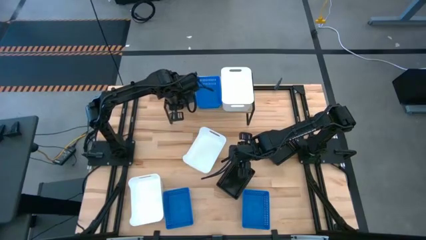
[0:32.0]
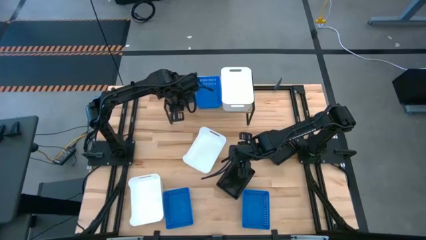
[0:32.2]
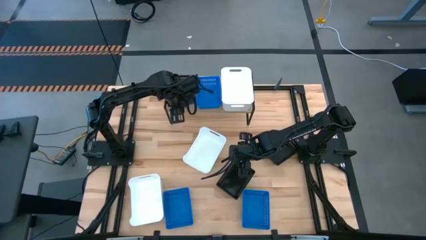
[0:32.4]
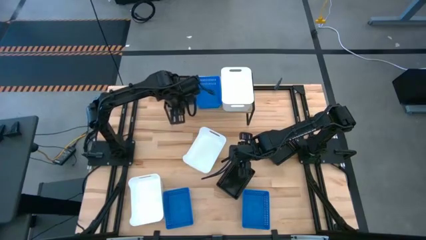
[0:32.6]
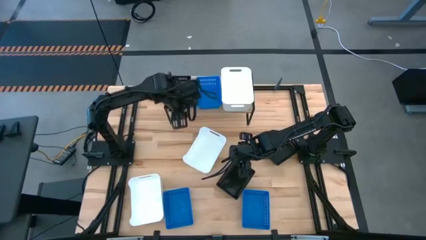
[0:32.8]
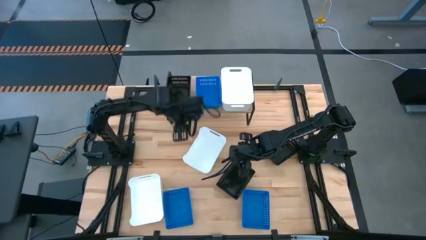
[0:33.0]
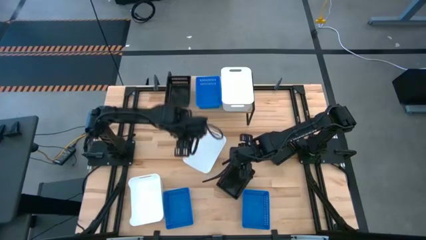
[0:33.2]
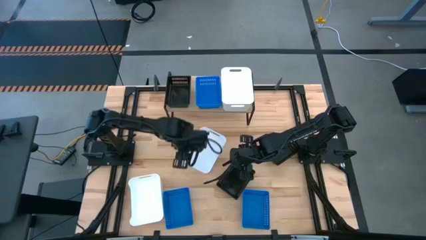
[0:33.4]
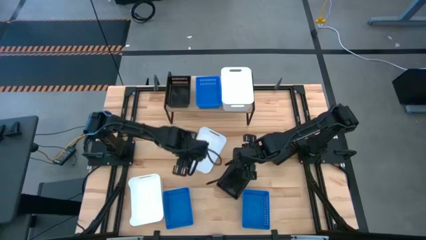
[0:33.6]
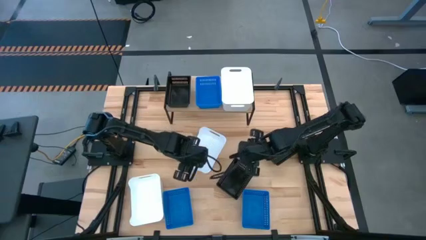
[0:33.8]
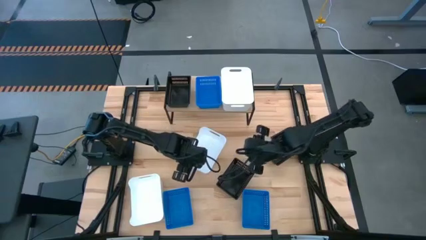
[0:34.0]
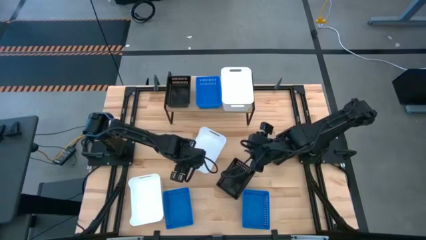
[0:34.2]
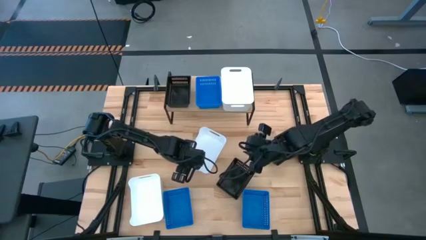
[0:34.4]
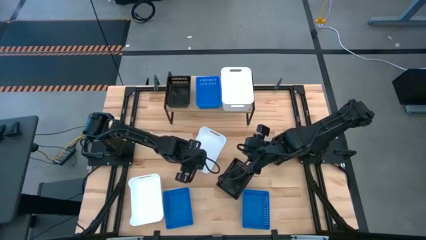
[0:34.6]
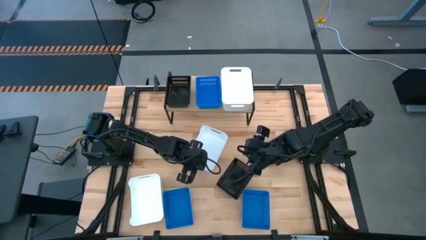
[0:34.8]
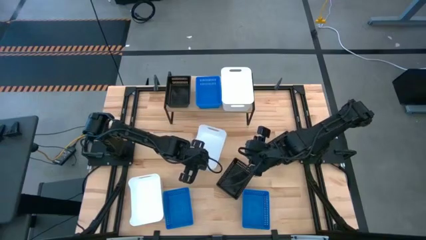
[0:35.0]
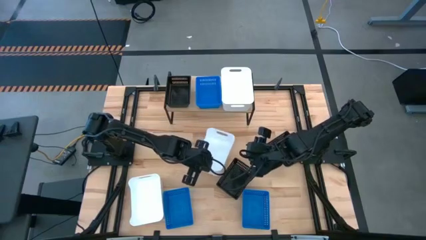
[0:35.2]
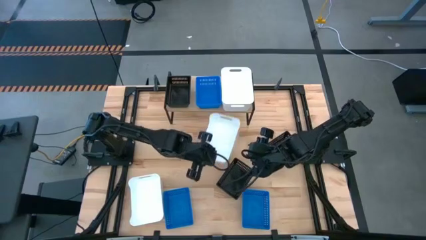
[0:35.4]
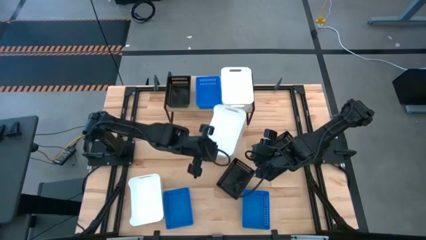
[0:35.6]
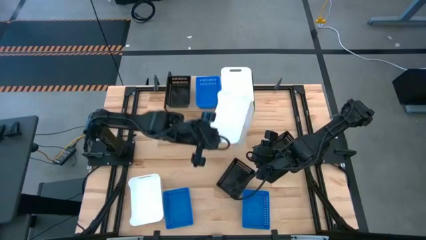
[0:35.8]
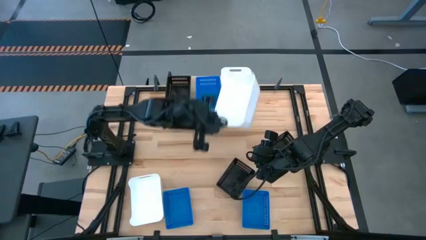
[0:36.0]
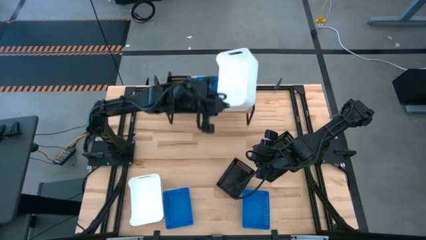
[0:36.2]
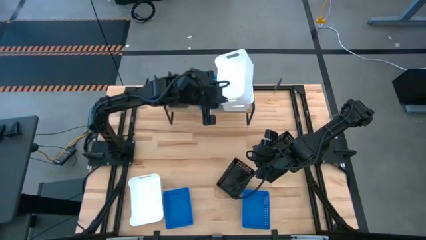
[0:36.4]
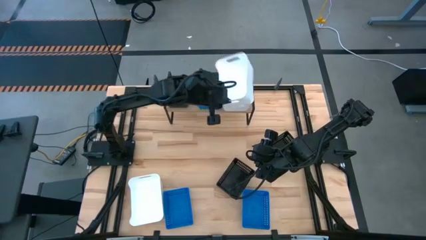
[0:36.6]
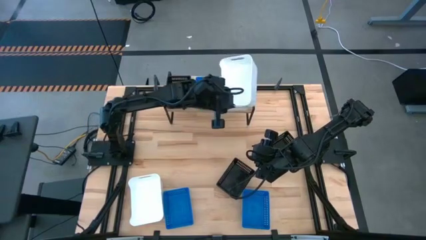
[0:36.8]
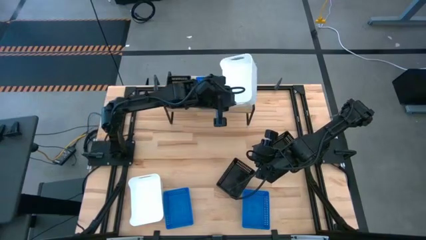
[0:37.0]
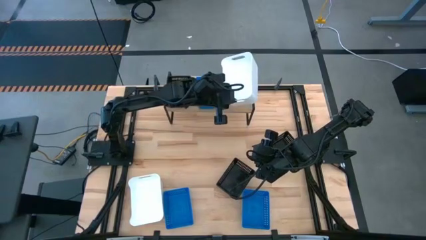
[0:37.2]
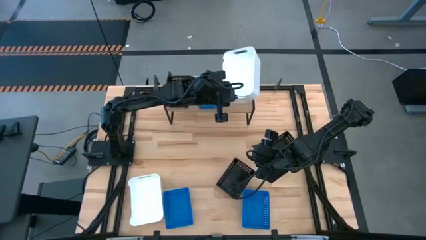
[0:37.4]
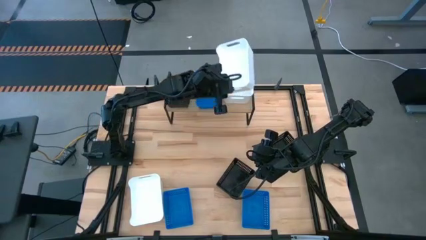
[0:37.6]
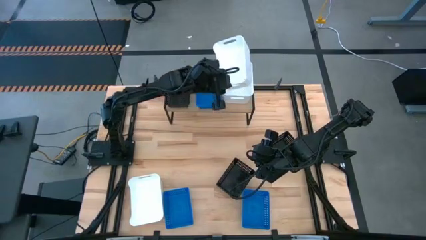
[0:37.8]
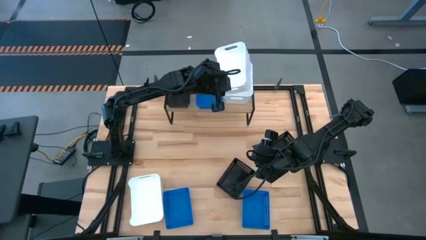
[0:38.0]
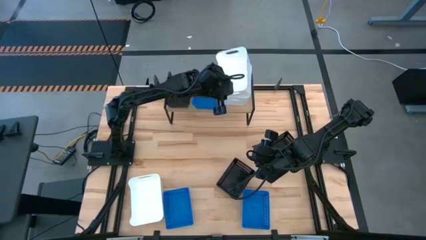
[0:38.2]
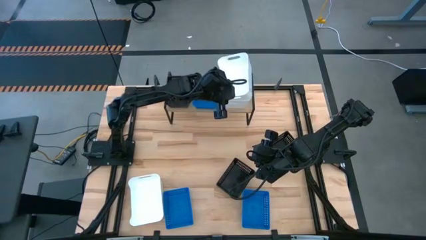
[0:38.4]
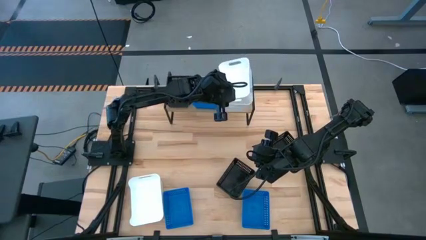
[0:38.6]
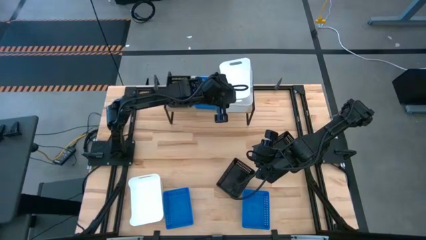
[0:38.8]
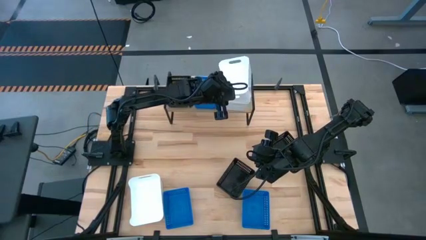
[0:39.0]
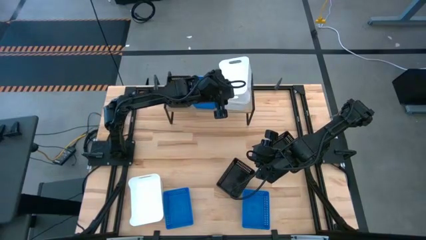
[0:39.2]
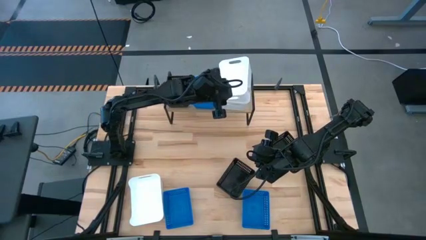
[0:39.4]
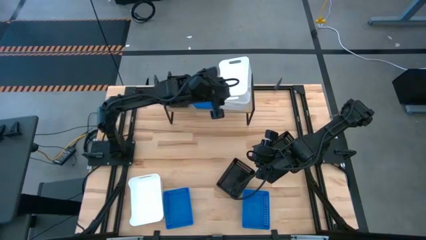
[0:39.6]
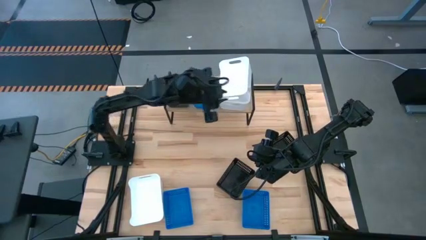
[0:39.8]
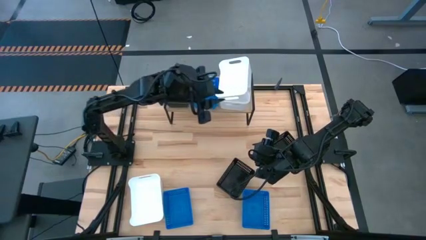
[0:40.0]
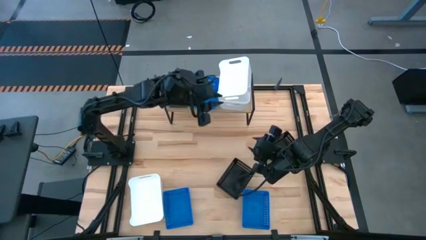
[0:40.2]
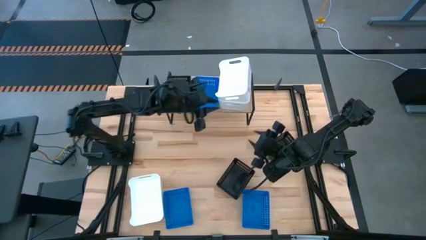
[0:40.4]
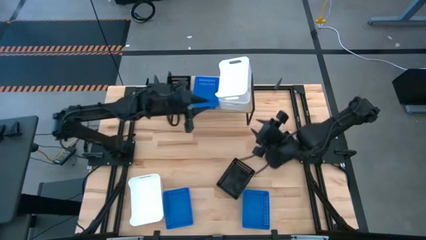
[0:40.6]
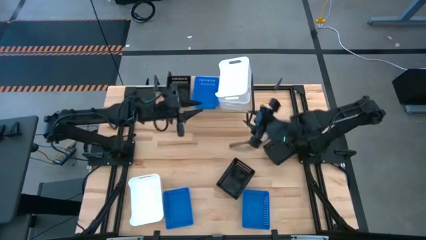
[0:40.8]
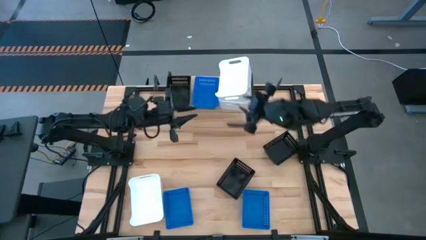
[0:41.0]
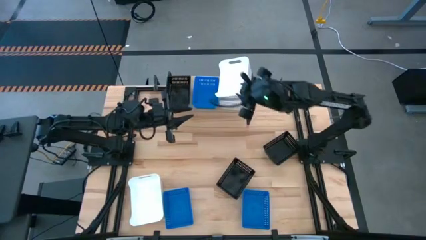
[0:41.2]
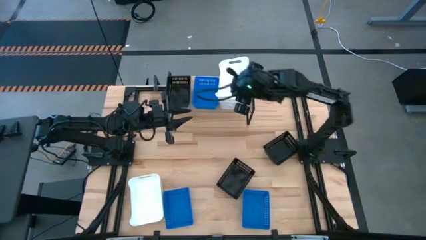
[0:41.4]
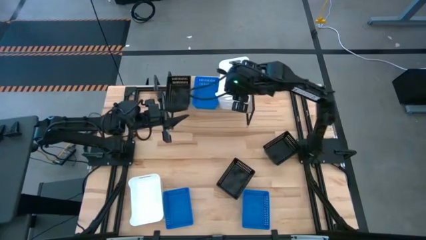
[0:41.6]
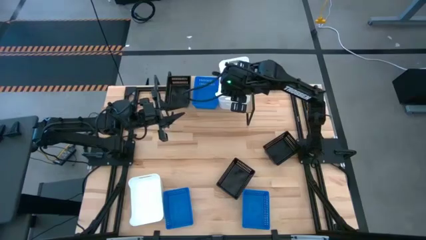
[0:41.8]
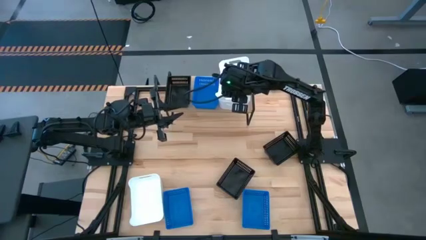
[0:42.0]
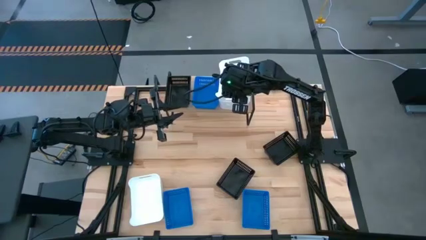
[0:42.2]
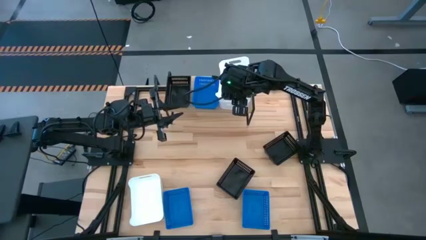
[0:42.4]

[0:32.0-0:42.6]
Task: Stack baskets on shelf by color
Stack the top white bin on top of the other white bin on the shelf

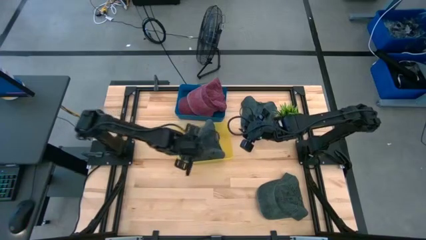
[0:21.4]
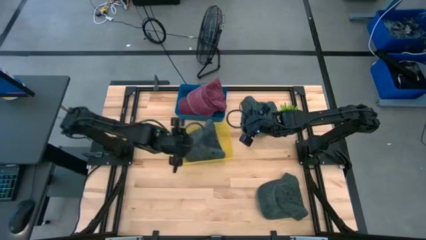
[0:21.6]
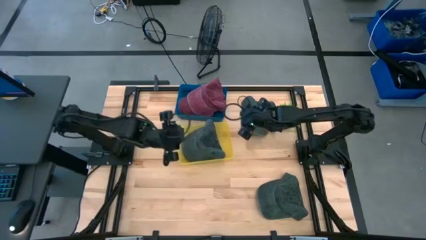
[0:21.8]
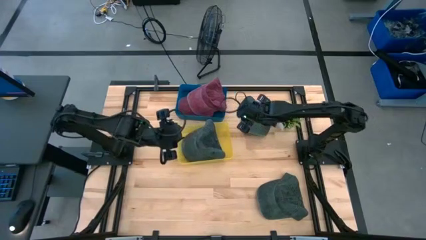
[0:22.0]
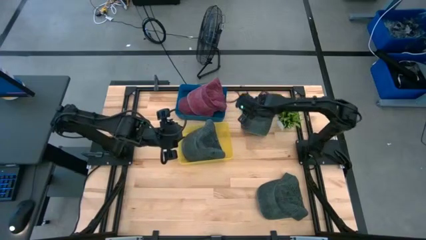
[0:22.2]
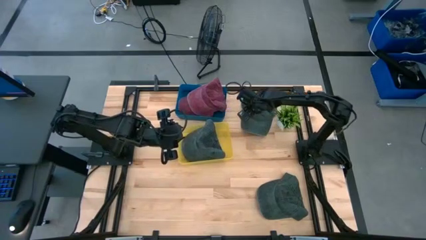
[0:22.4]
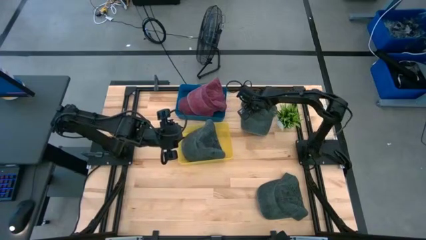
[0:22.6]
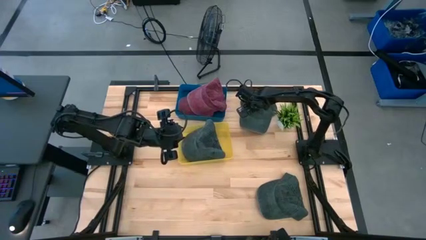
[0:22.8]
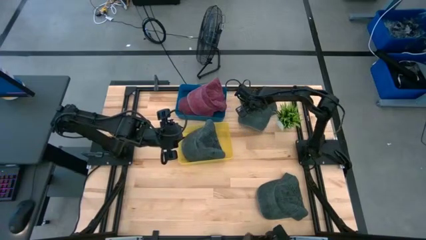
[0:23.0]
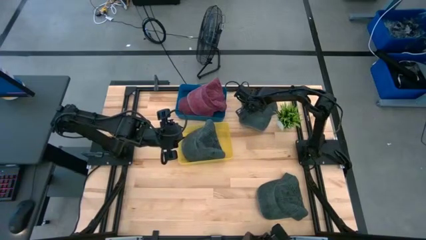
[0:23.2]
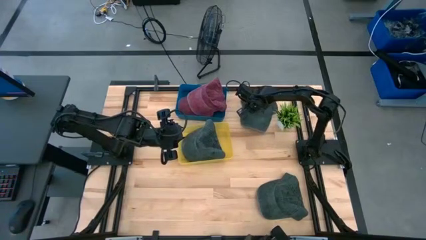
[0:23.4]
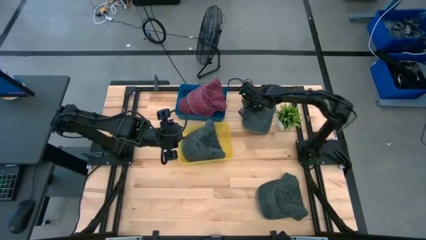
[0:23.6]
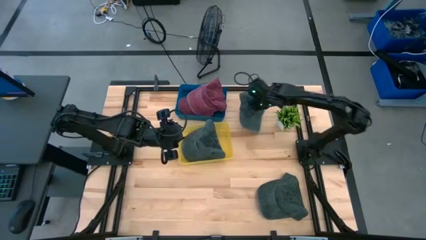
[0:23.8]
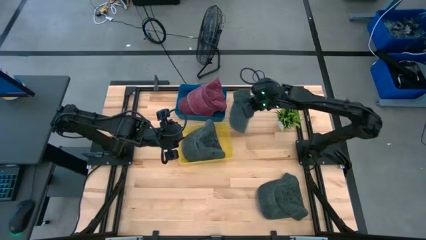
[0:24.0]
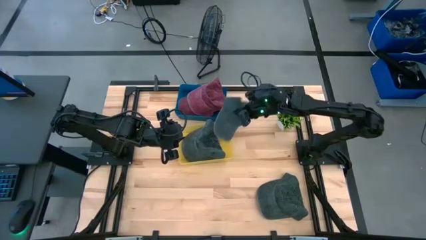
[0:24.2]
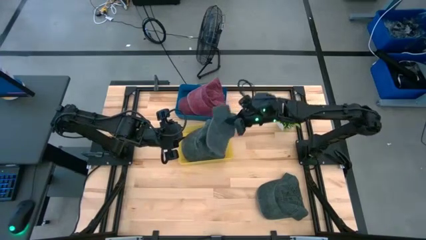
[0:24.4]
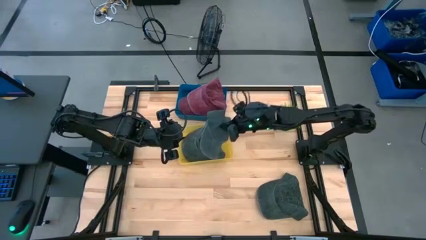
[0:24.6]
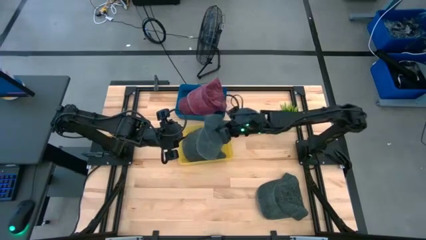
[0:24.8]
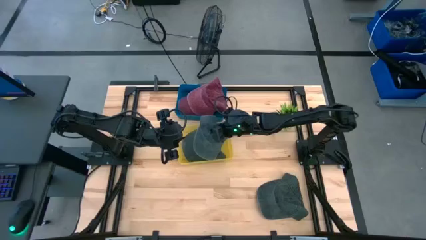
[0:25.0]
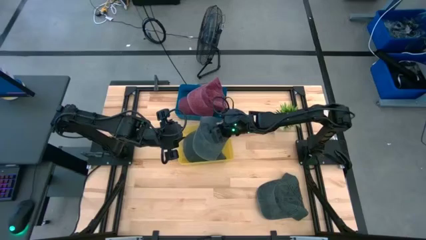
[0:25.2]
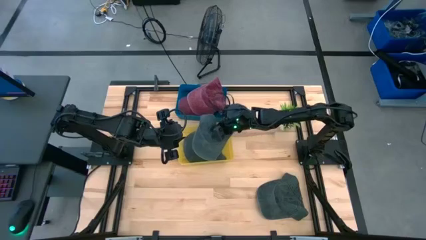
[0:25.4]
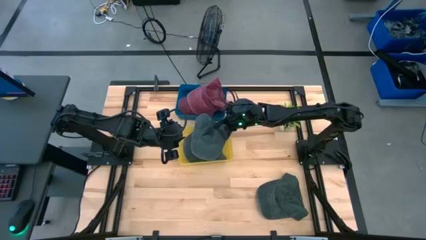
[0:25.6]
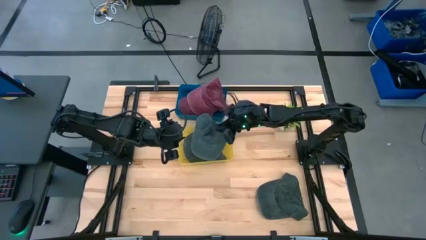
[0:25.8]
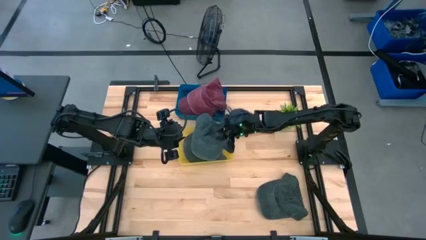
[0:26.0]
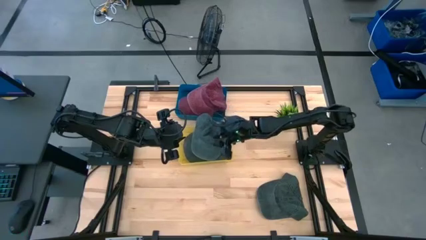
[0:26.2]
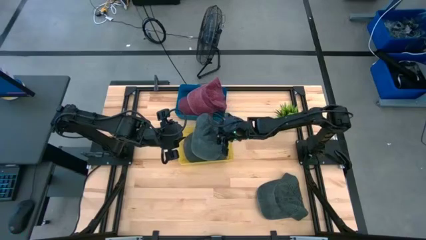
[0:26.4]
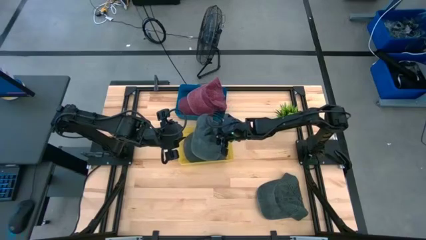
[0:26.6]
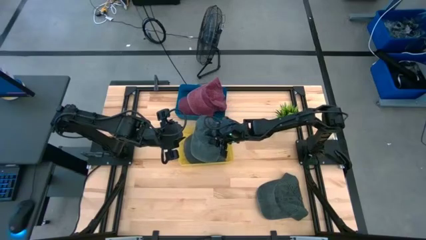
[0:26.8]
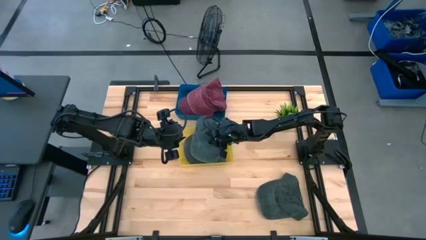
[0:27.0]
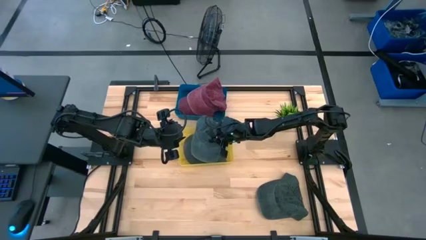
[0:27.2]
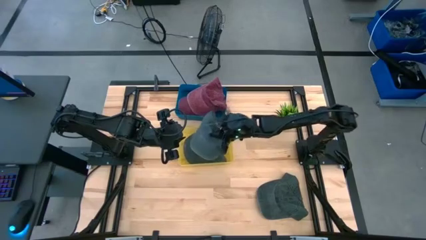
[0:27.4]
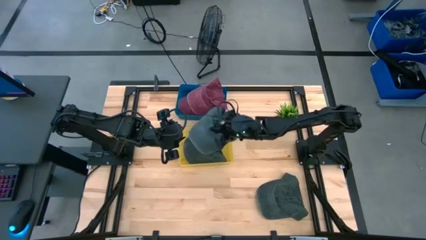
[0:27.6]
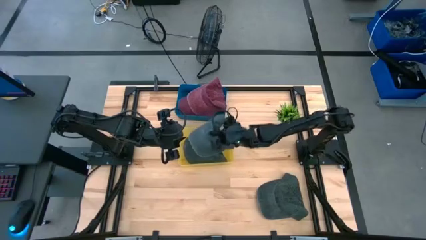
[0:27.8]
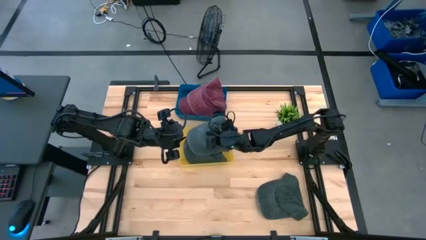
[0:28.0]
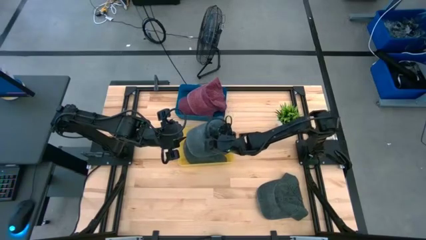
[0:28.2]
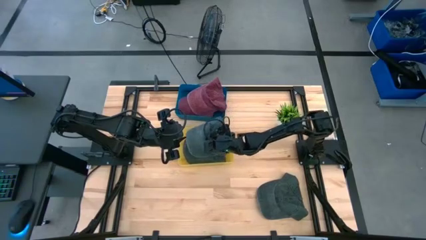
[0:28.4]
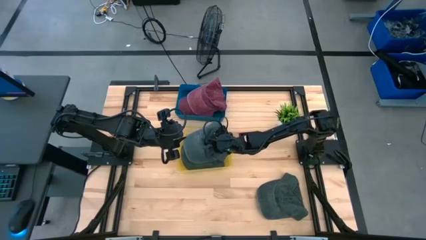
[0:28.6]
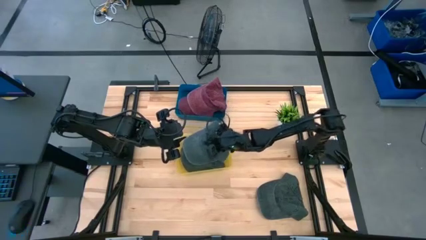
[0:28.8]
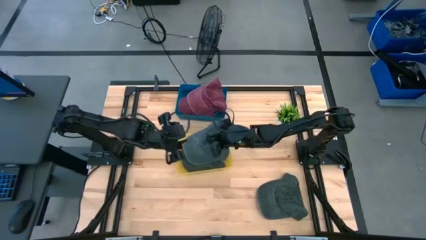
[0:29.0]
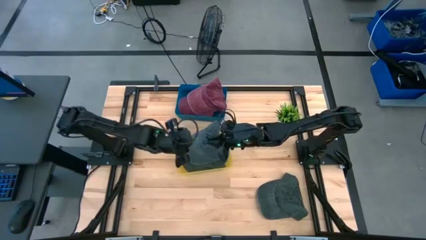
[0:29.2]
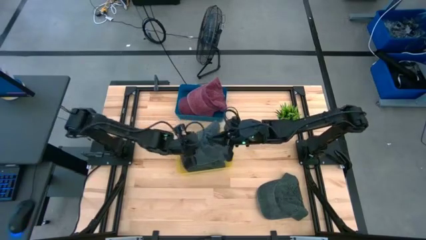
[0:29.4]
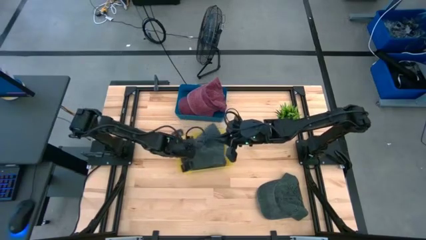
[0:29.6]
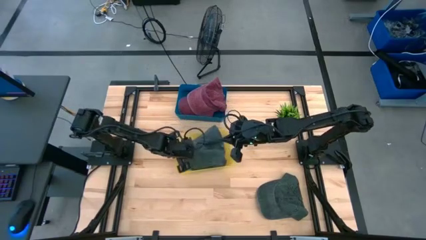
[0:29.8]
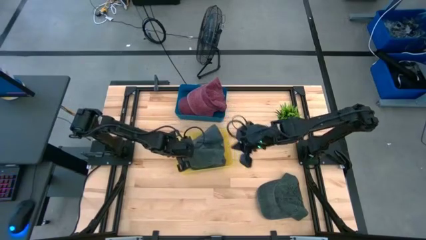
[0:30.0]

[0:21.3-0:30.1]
Task: Pick & Place hat
Put the top grey cap into the yellow bin
